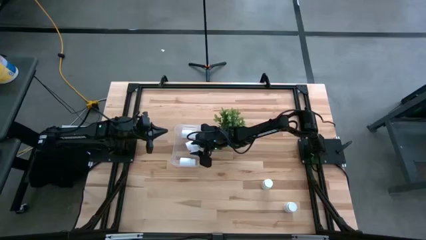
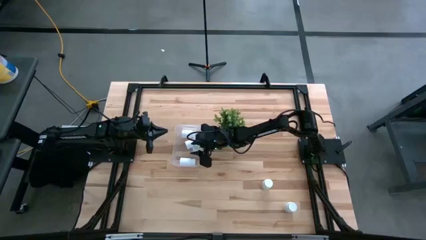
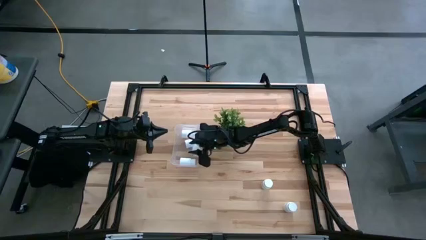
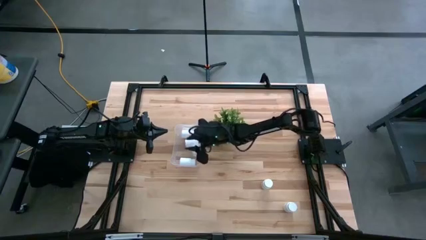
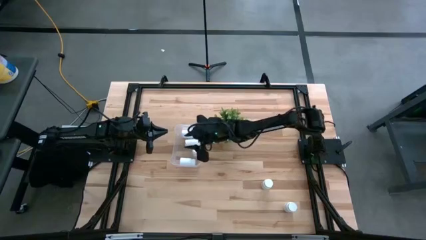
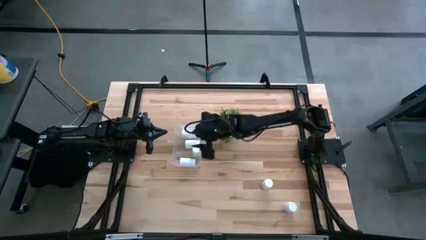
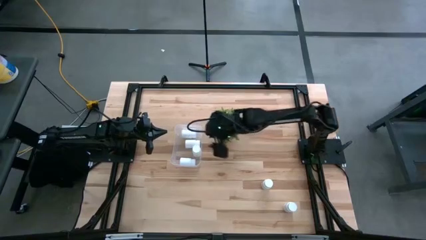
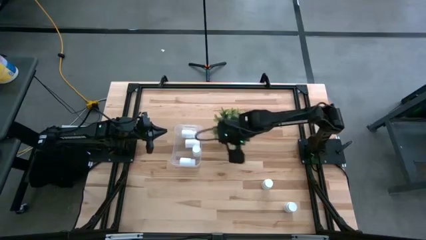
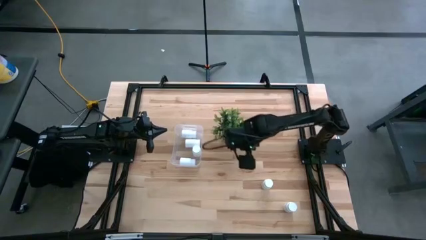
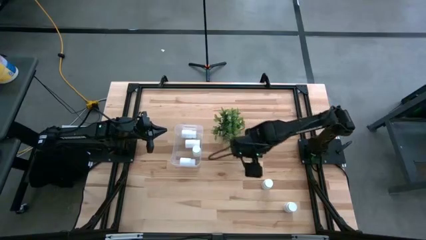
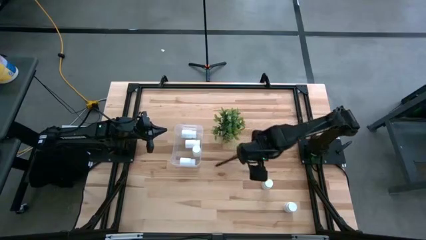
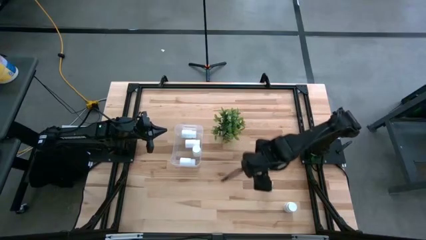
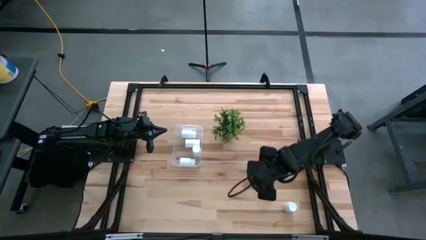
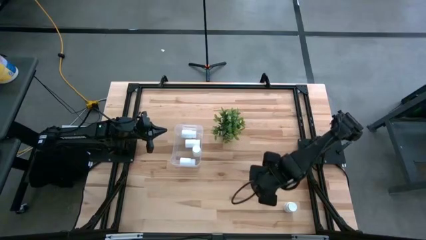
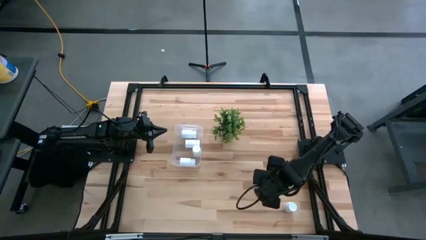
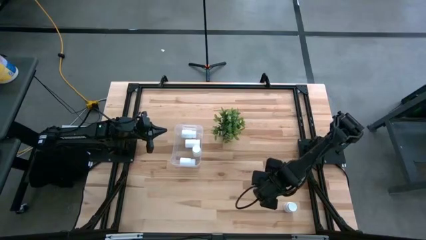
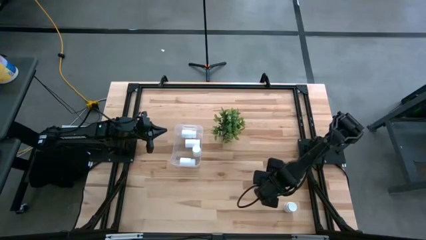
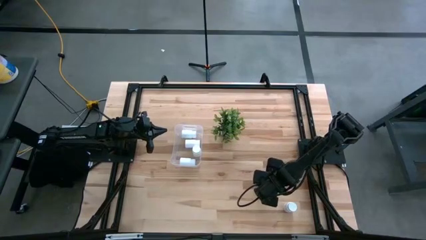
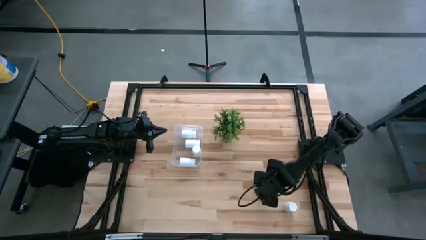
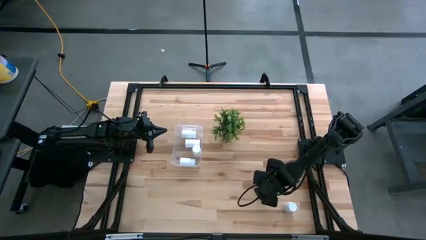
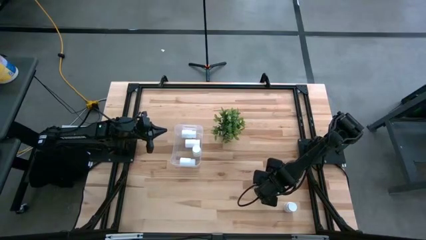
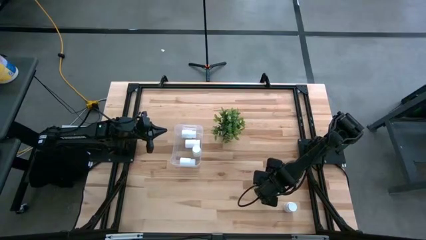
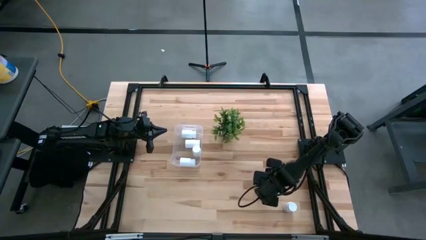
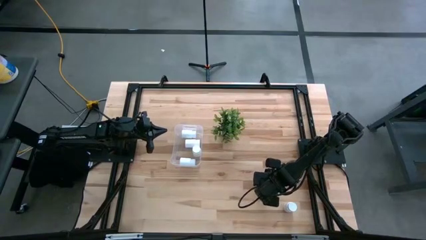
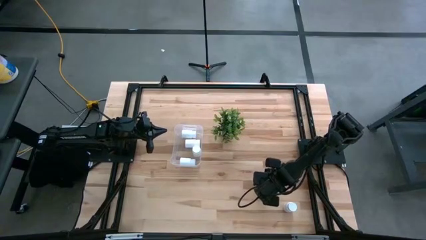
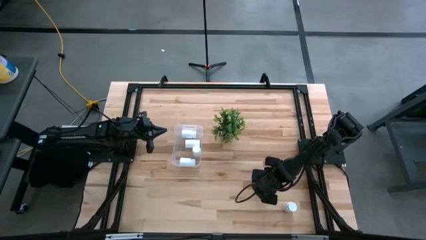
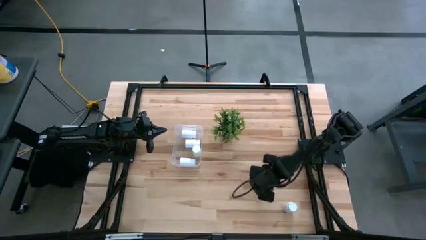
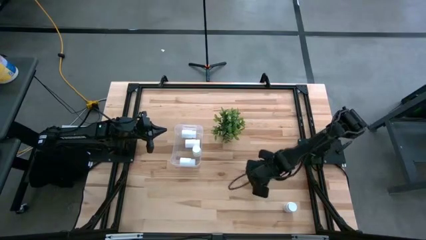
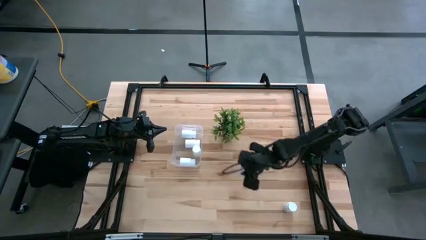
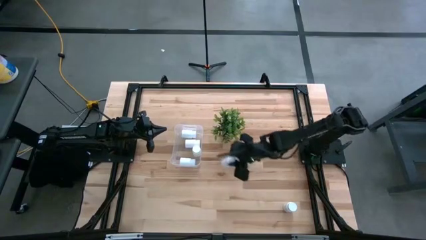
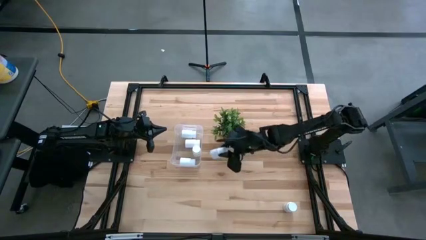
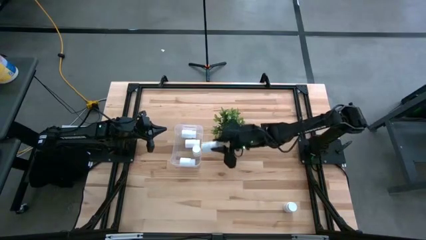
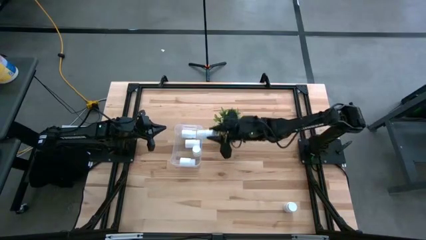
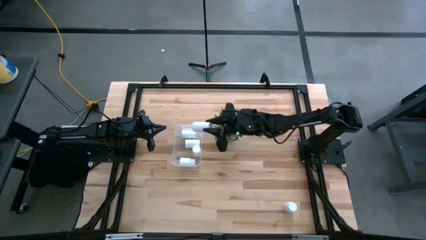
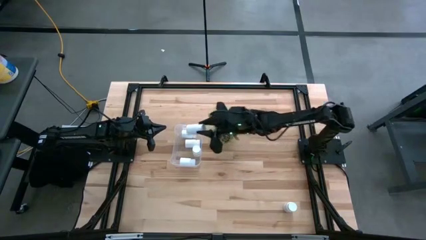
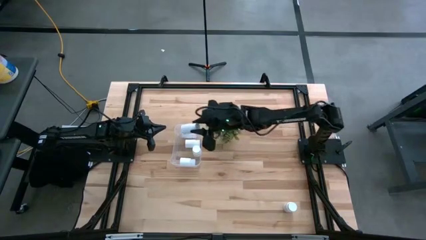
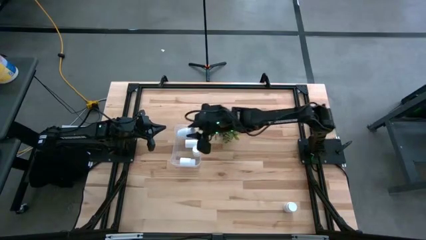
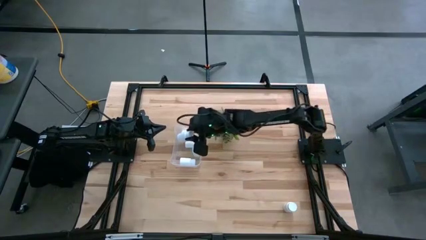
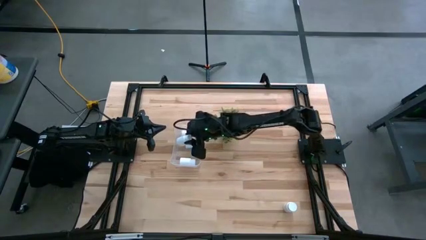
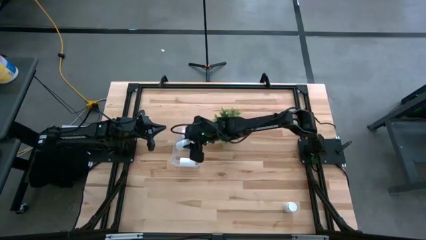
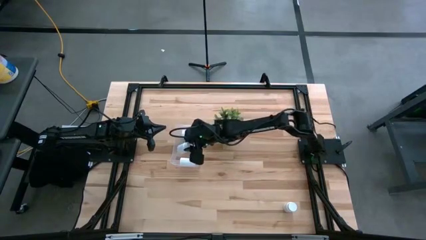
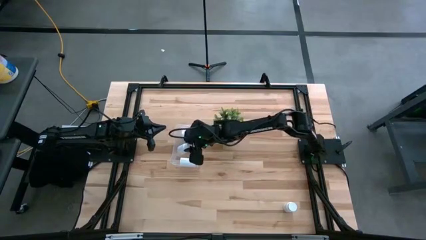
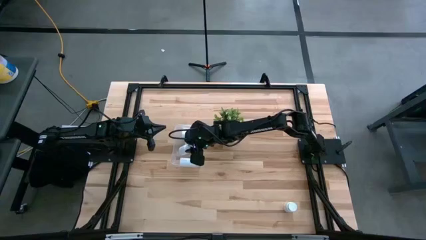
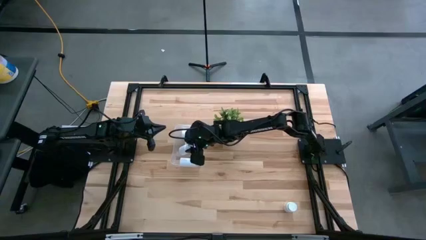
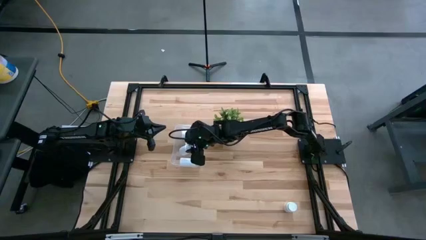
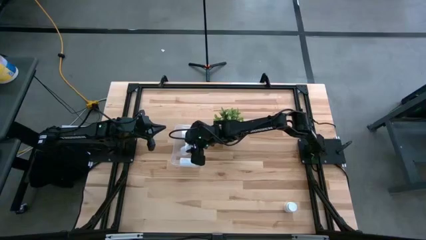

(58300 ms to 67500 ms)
Task: Pick and place pill bottles into a basket
Put the white pill bottle into the transparent bin

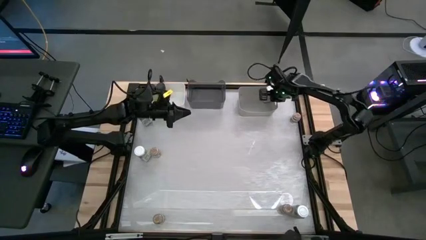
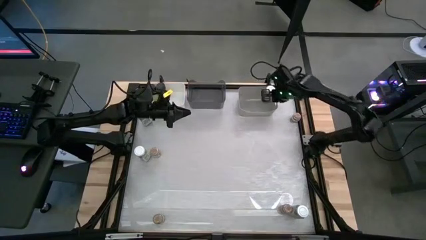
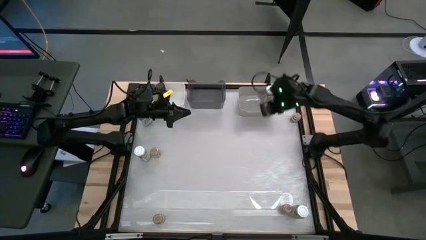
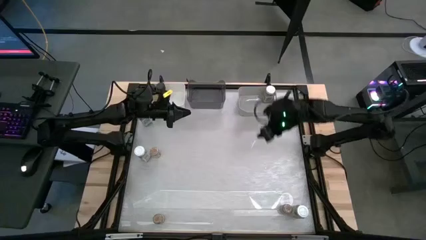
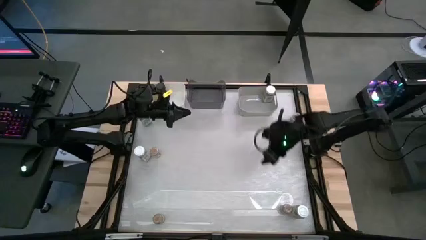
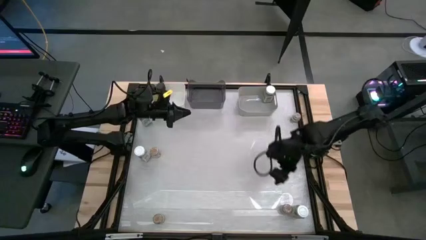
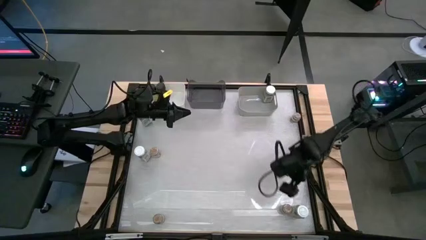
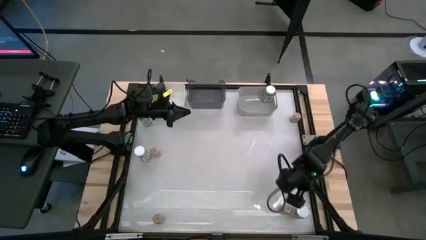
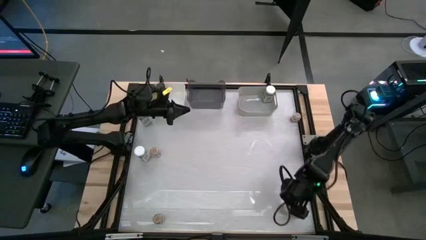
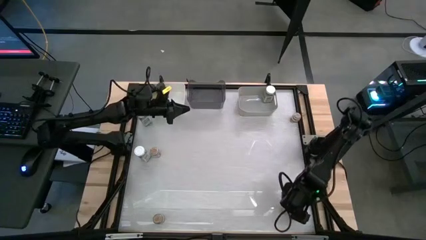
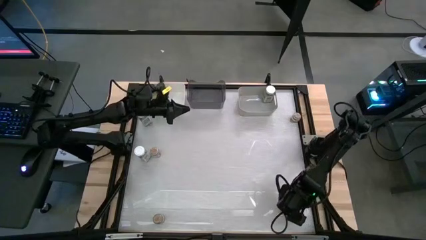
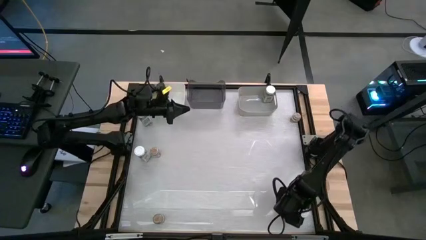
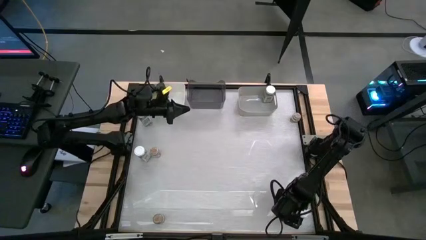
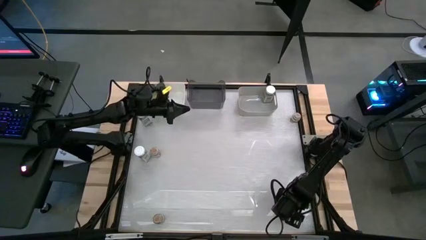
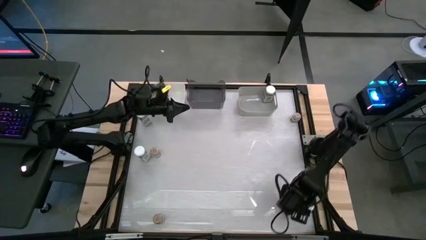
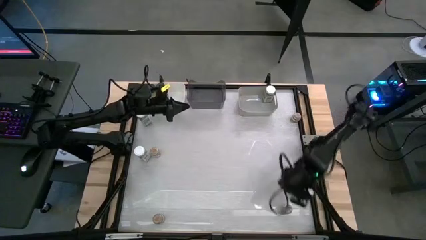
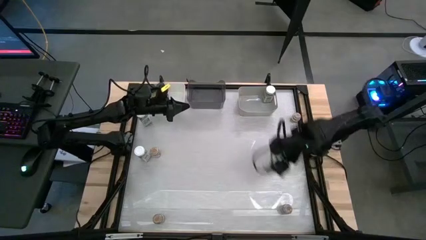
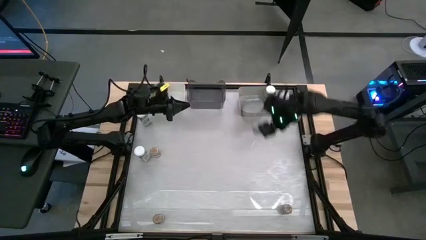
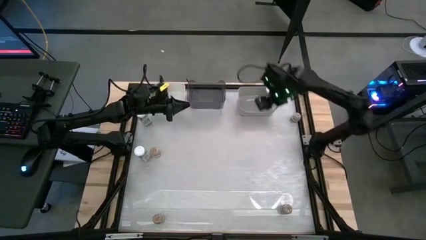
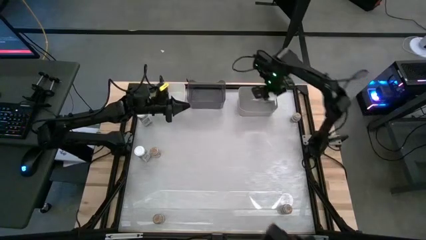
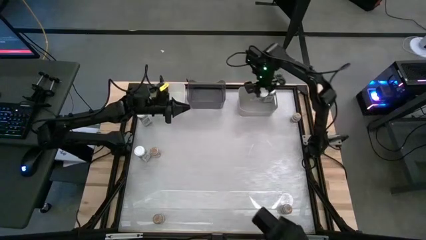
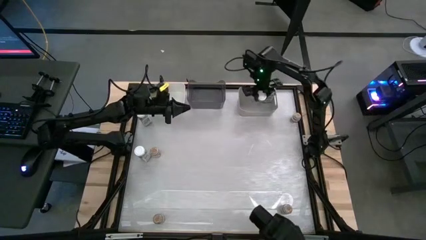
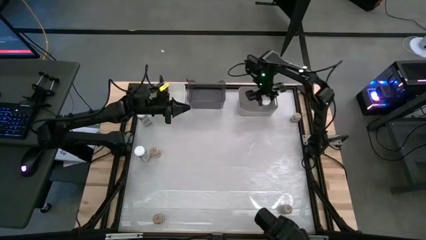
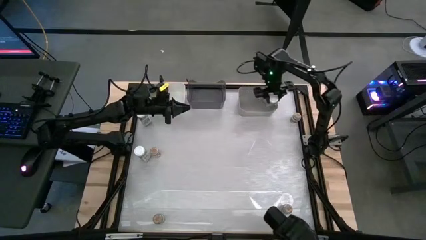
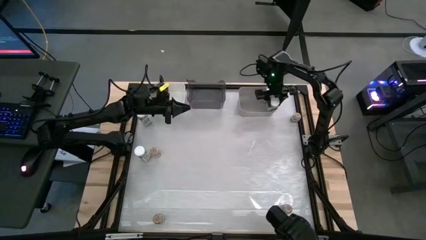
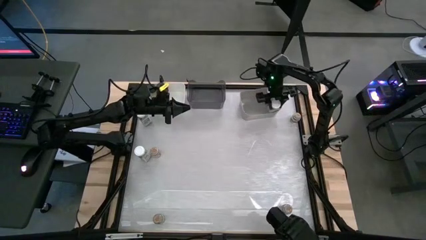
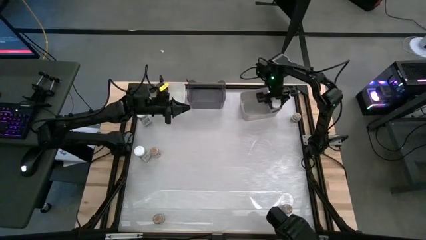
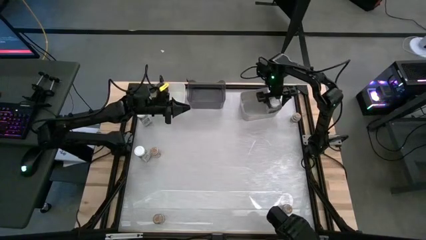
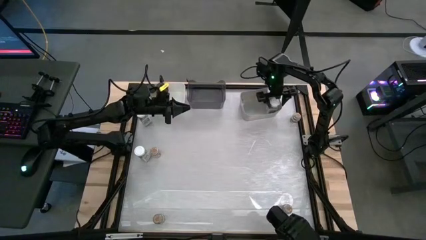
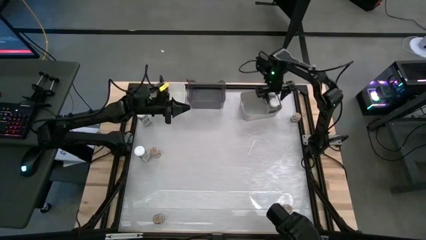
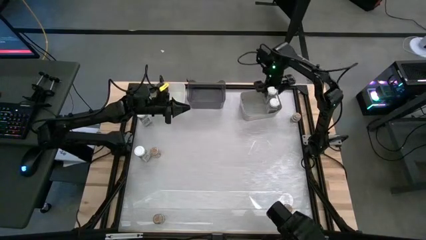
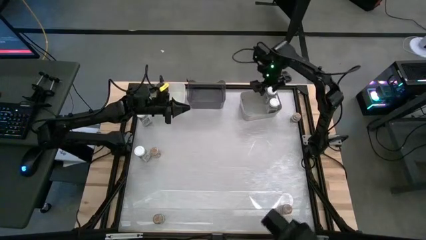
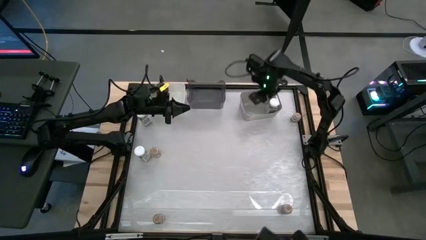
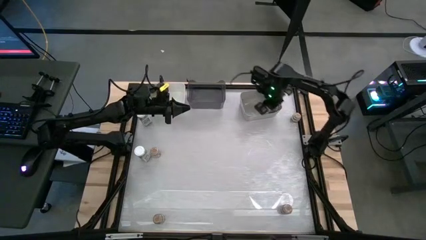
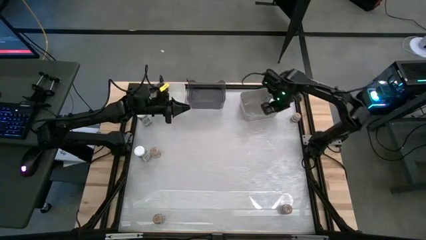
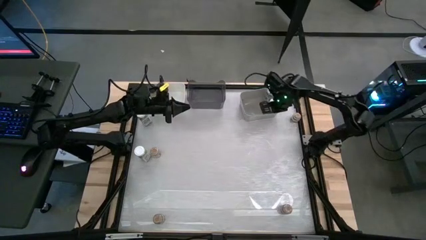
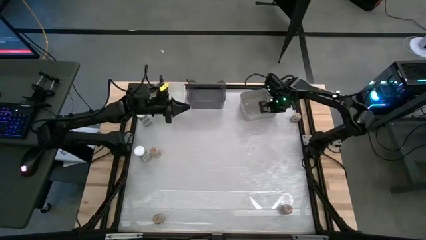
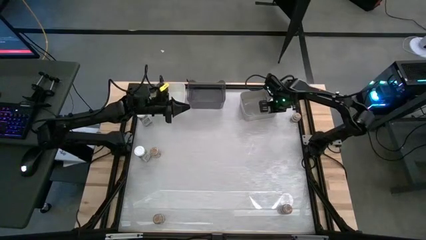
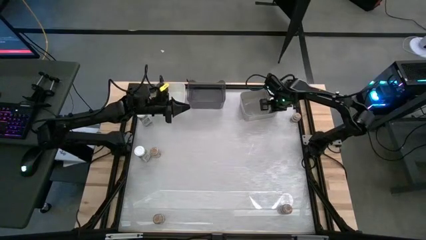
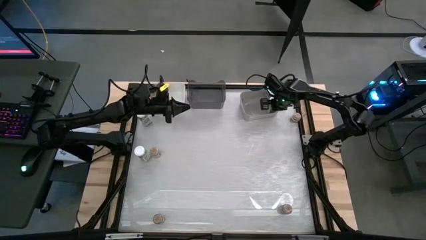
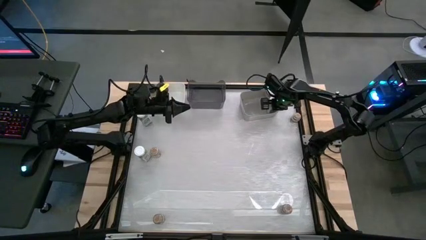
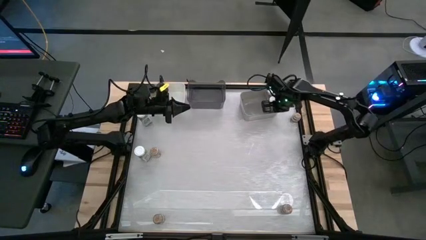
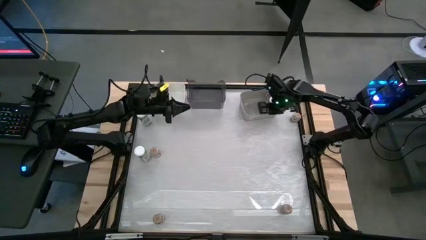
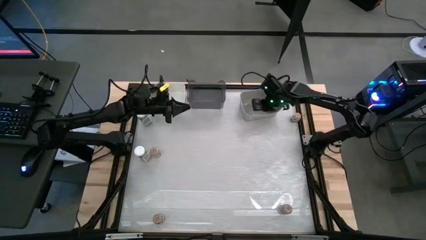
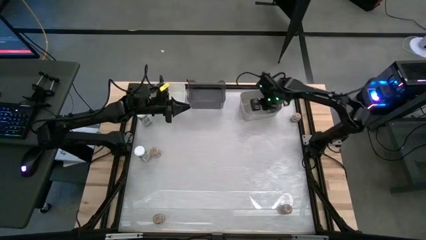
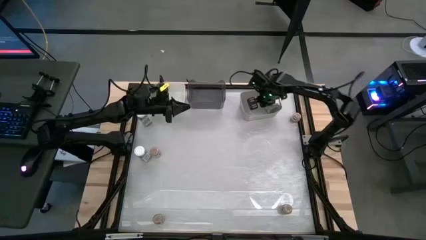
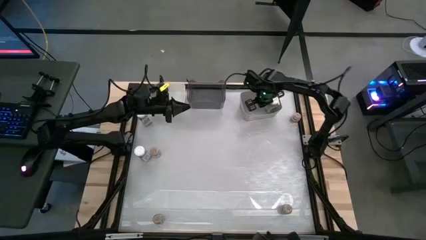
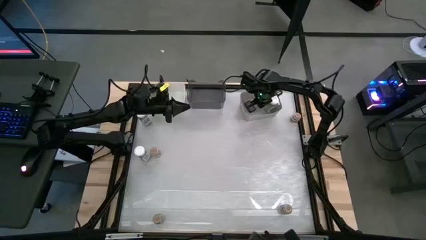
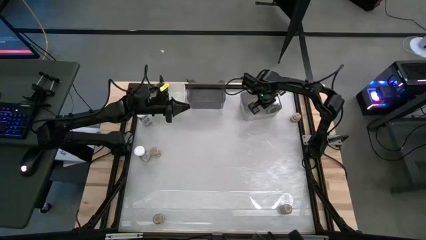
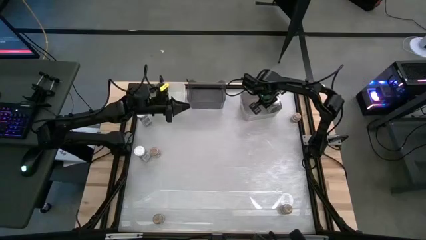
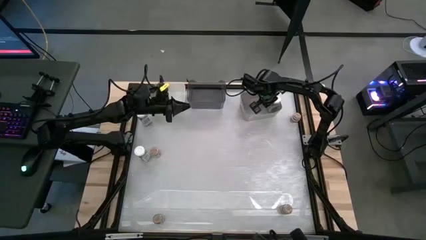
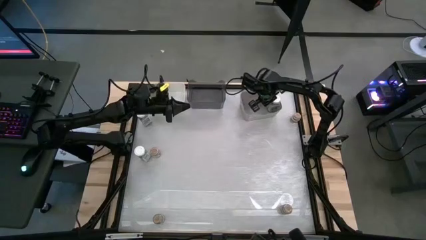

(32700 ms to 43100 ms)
Task: Sort spices by type
Put the bottom right white seasoning bottle into the gray bin
